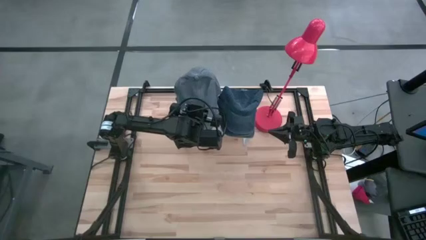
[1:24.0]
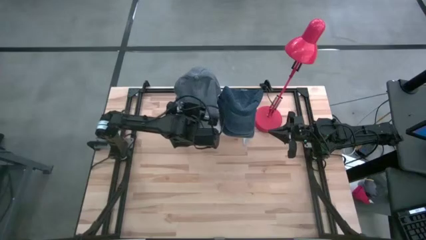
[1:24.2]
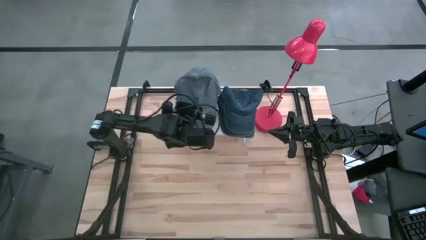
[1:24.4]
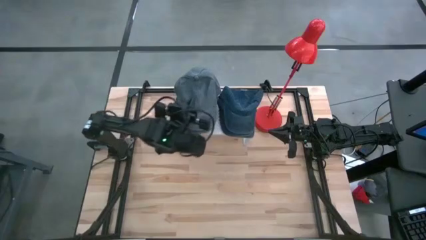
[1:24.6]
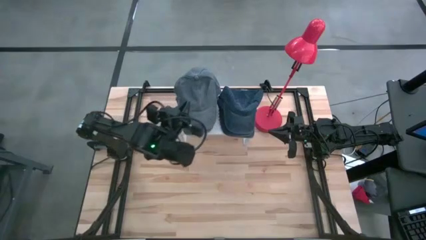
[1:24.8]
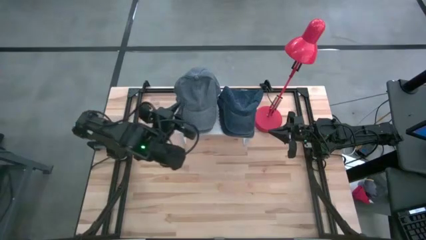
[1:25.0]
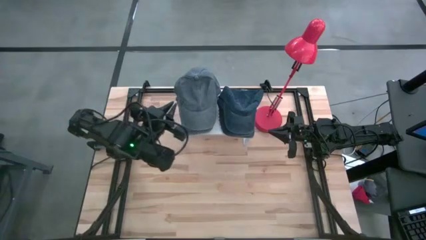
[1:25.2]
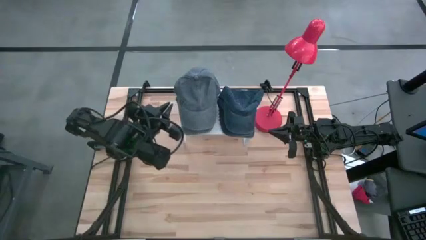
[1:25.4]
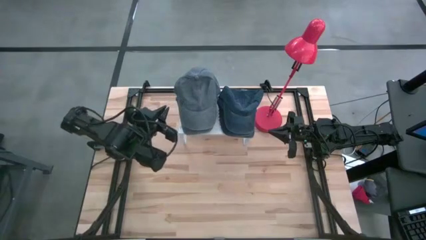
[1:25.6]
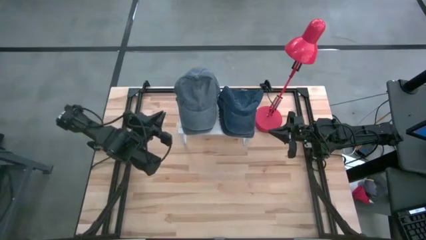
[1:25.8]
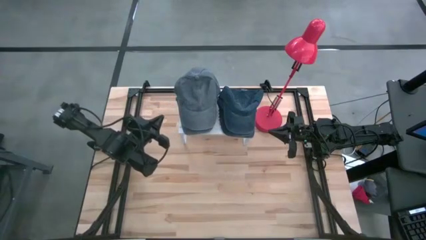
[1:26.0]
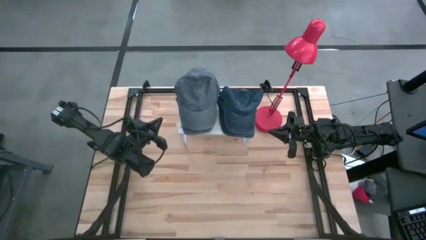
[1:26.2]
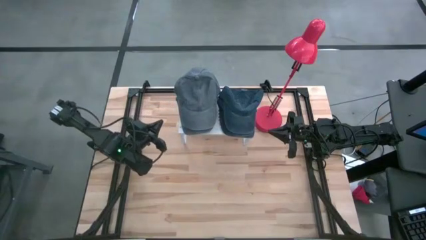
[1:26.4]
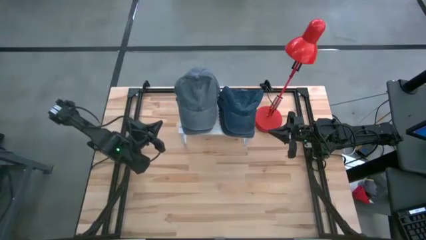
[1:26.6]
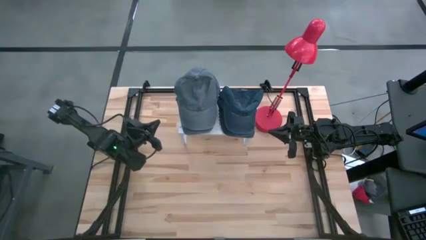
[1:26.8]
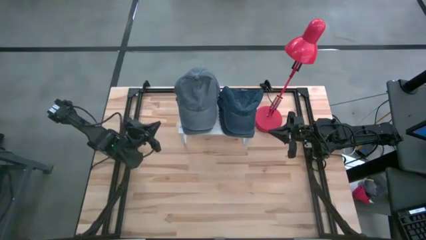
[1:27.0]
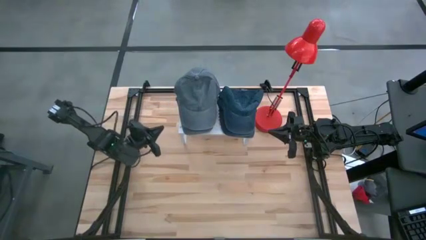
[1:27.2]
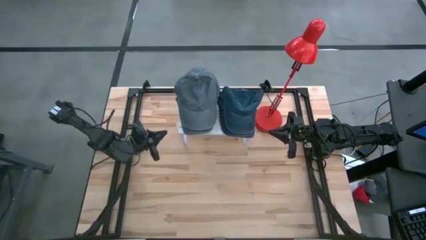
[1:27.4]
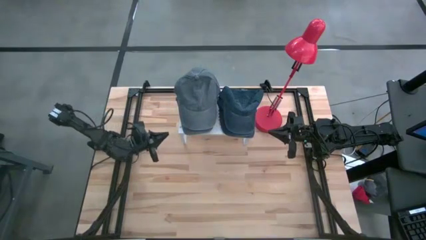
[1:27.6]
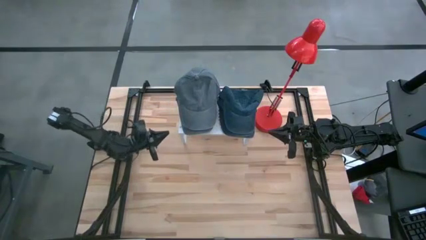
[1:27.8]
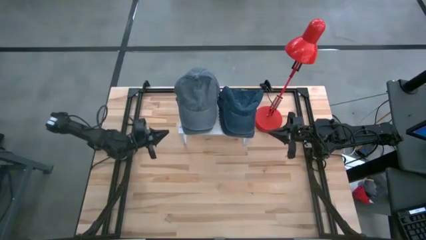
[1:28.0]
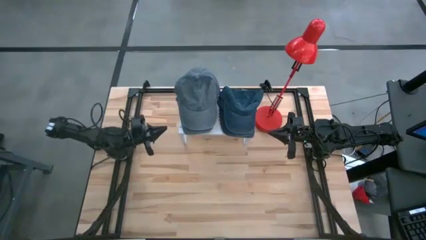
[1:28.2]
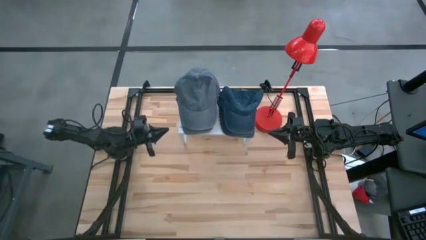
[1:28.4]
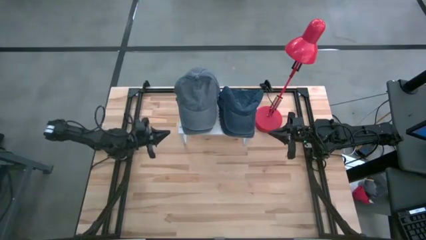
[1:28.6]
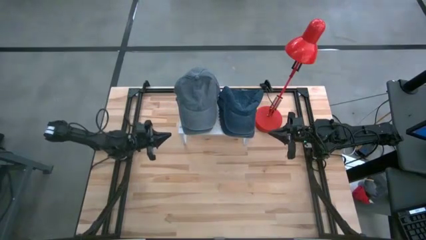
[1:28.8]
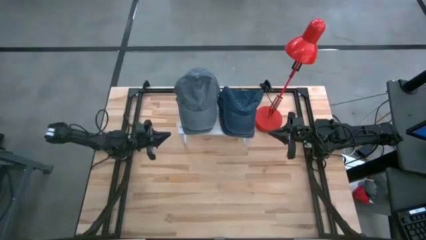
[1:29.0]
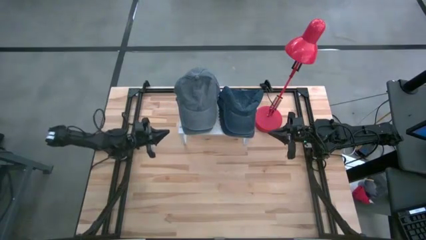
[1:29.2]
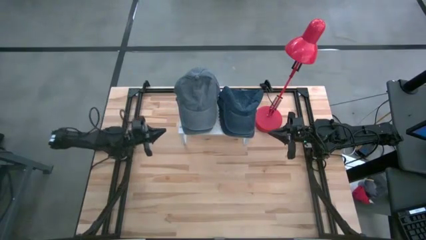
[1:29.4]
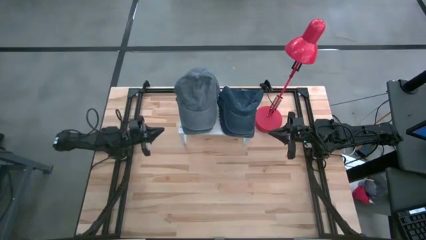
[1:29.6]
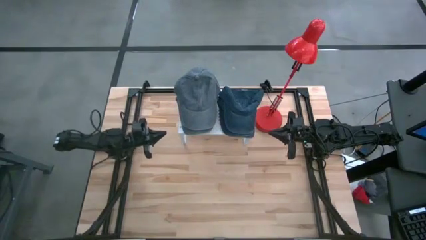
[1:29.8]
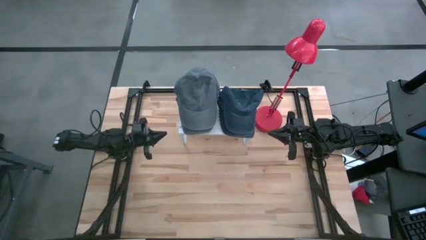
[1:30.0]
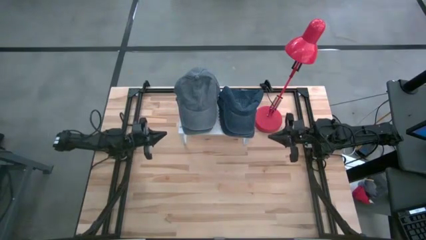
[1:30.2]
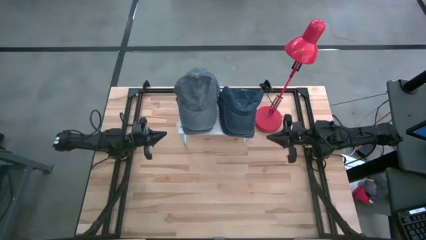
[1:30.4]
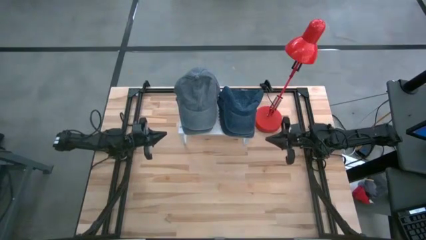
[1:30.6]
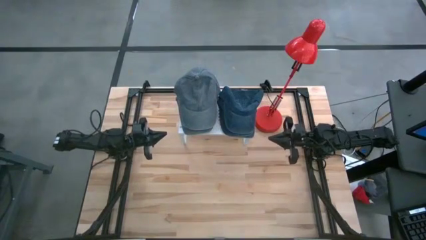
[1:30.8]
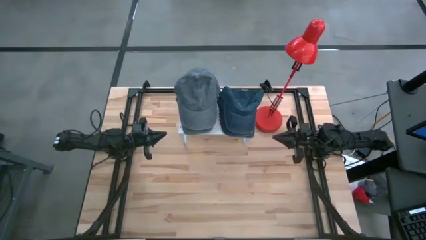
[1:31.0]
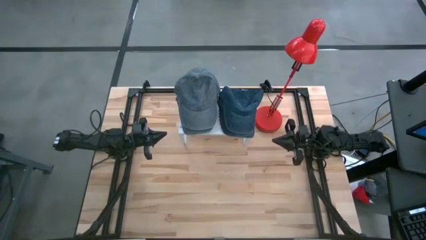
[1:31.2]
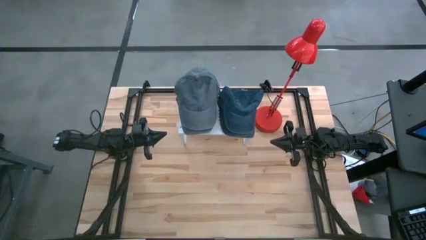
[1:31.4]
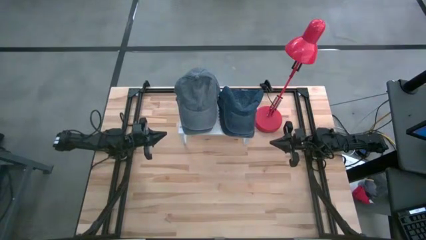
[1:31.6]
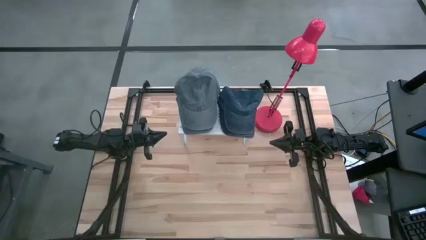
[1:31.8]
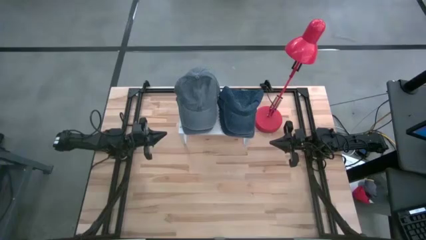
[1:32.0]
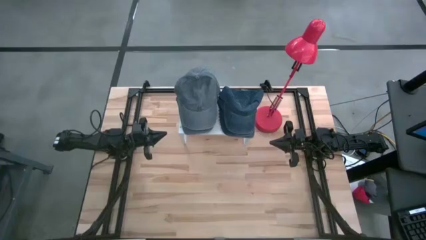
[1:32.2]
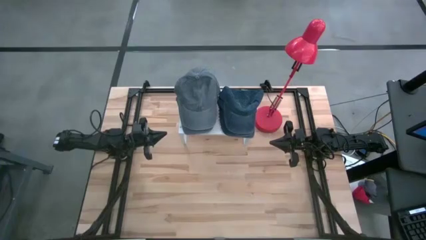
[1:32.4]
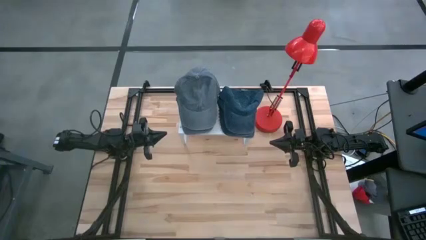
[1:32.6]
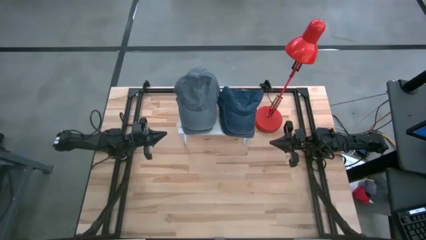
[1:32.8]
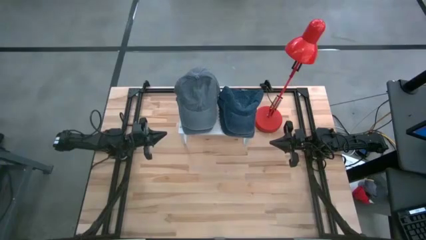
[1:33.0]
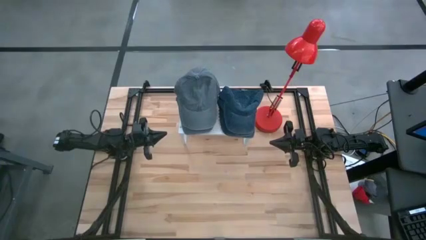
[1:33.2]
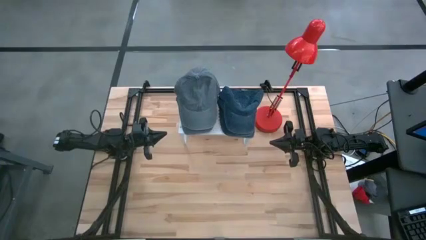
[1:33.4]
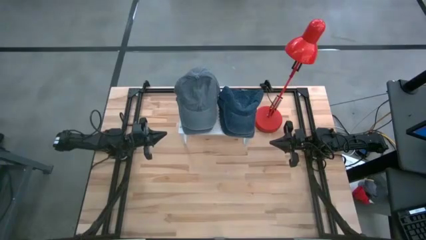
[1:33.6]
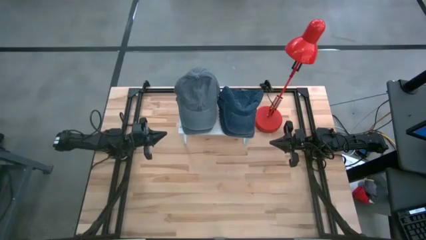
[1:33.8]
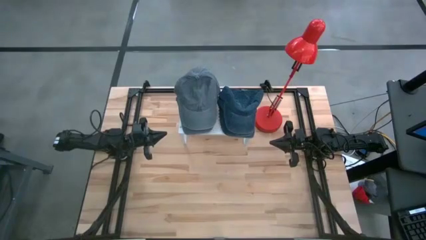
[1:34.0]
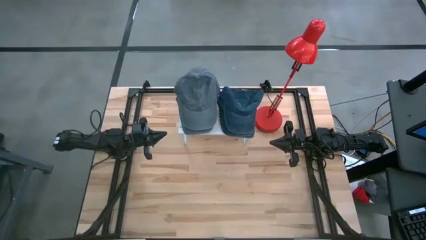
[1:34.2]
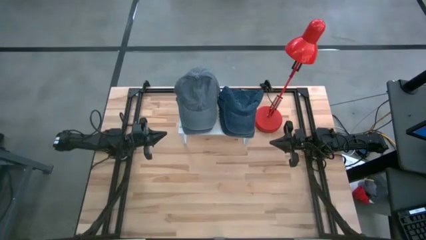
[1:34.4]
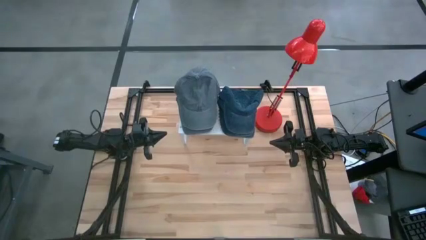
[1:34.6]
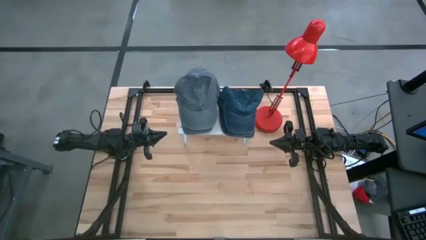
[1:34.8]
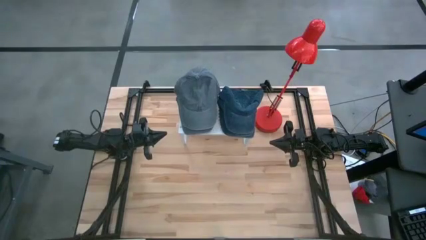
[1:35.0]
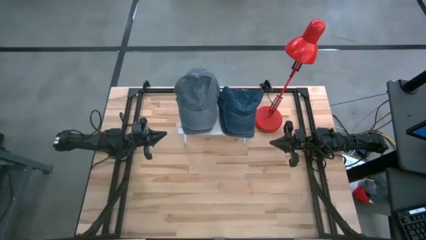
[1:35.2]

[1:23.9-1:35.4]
Task: Pick & Place hat
Return to Home Position

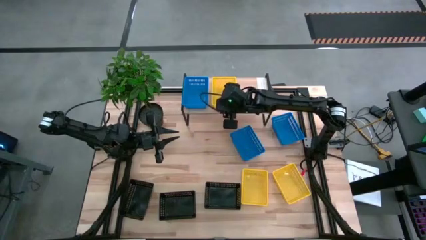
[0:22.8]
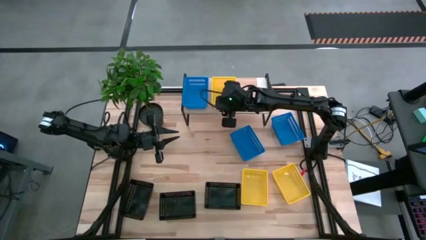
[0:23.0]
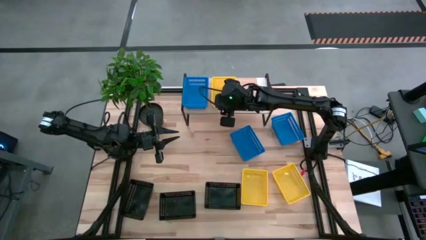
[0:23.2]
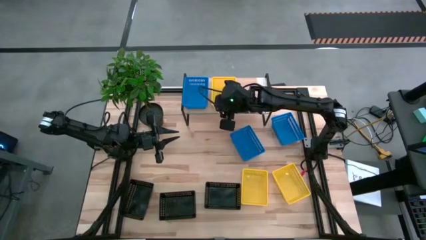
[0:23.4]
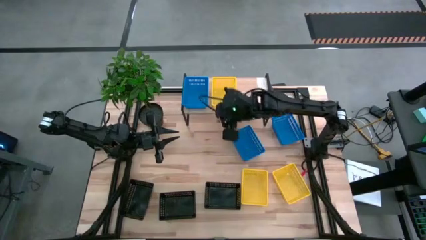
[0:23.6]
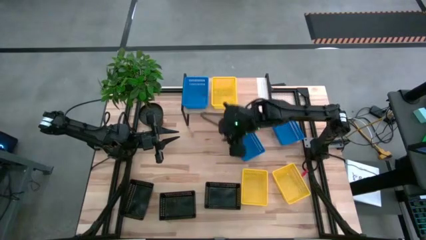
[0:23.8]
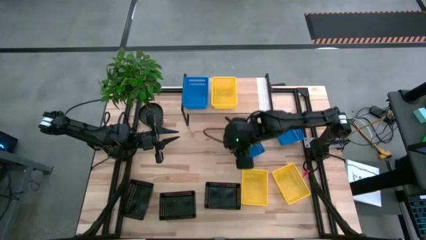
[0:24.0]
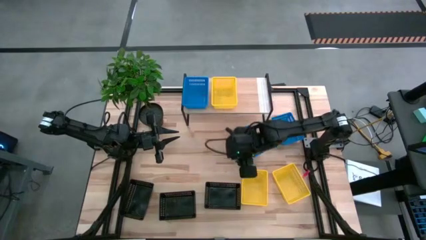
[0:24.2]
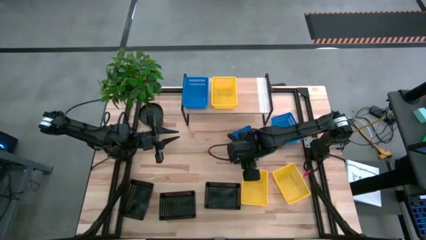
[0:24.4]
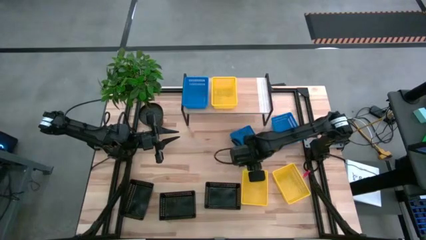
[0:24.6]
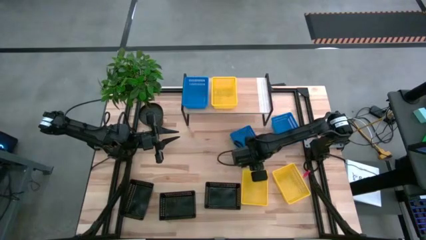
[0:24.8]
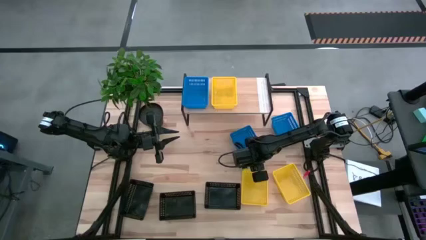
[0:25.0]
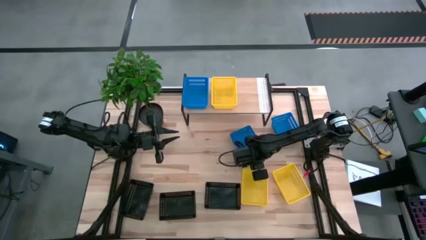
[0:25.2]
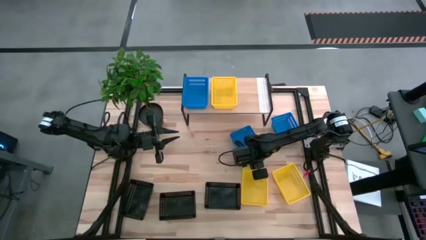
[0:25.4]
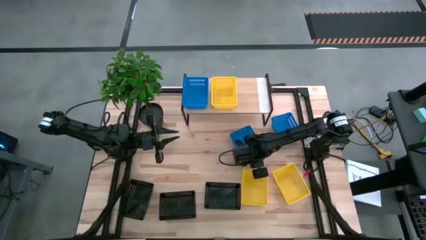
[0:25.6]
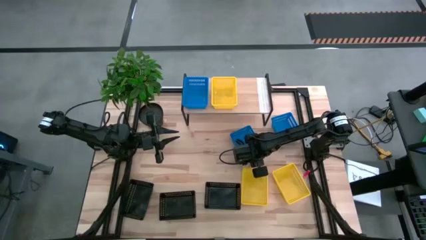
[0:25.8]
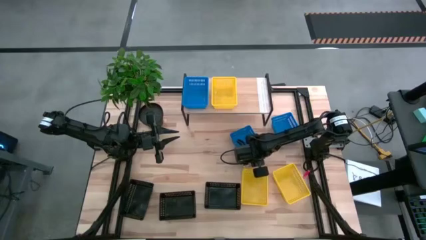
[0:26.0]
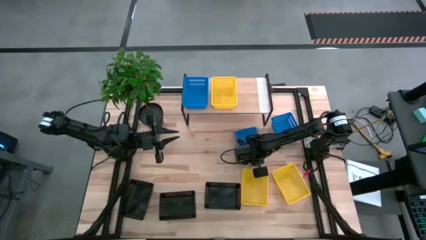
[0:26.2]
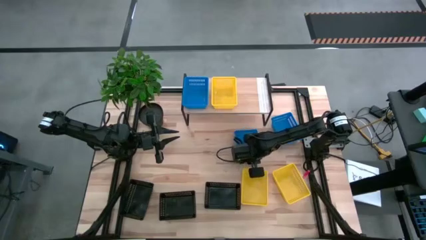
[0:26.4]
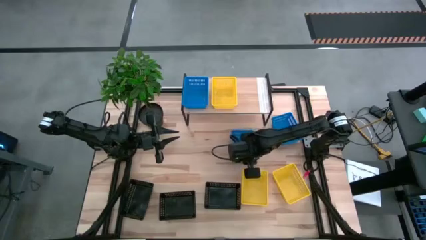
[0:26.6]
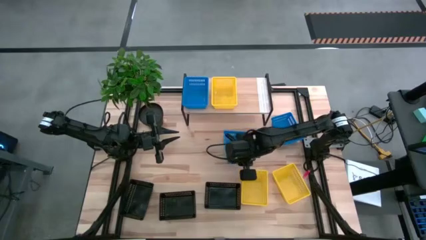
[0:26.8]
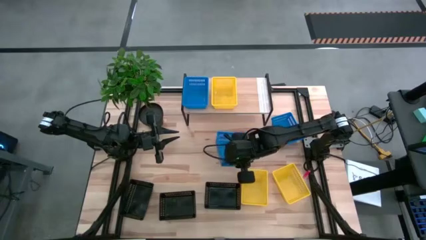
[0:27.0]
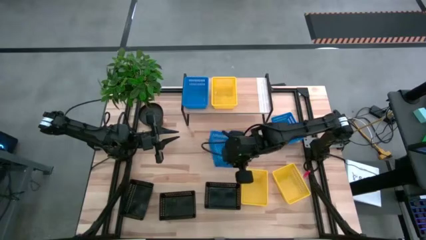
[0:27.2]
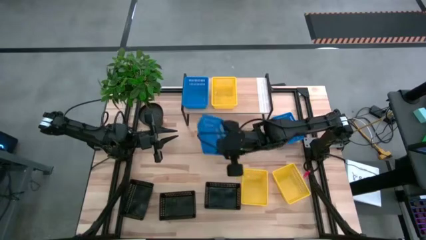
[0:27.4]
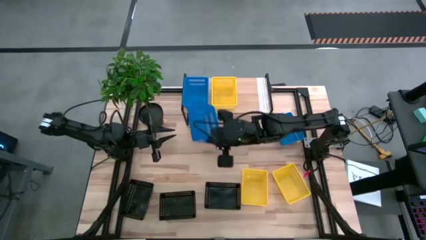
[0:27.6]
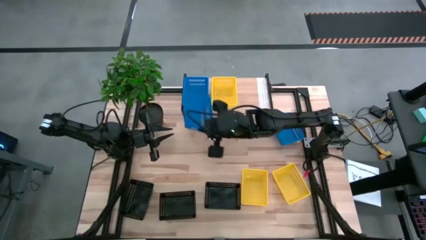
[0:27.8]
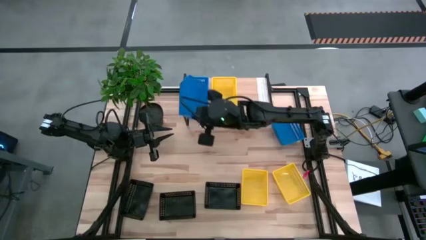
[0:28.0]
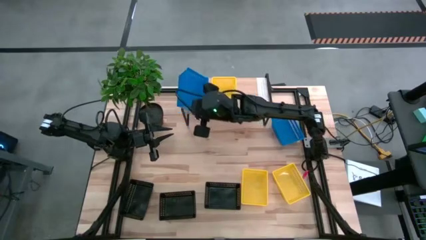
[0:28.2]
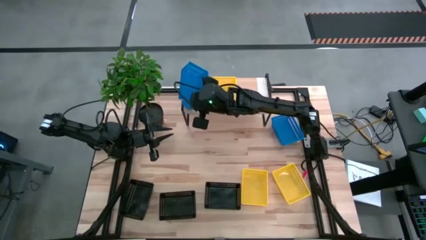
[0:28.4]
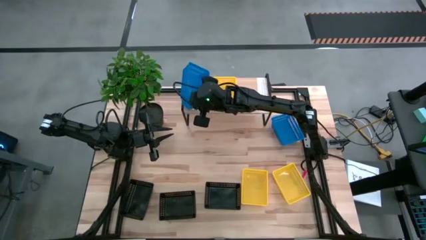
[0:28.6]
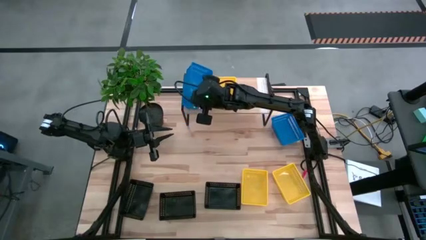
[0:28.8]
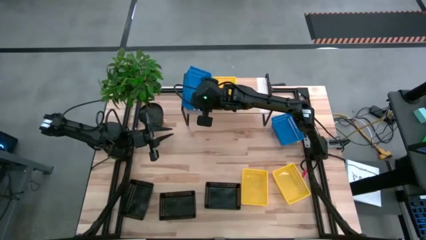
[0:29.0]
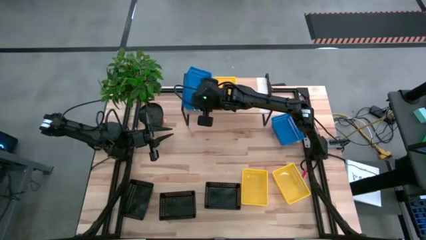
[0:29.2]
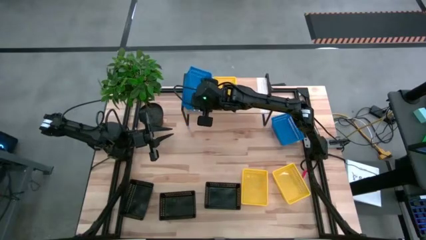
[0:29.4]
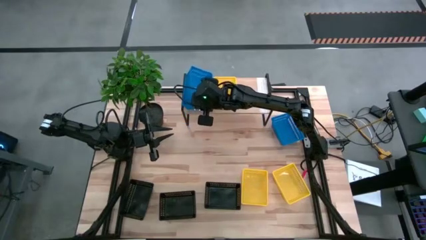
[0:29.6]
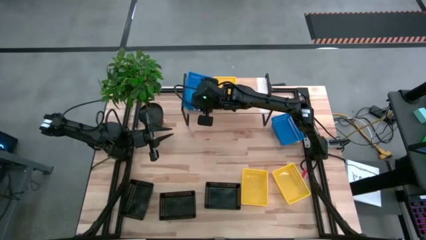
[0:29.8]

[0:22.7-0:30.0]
Task: Stack baskets on shelf by color
Stack the blue bin on top of the other blue bin on the shelf
